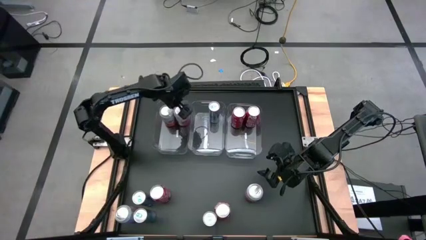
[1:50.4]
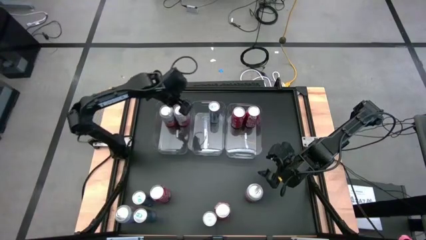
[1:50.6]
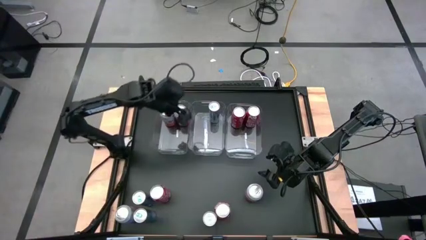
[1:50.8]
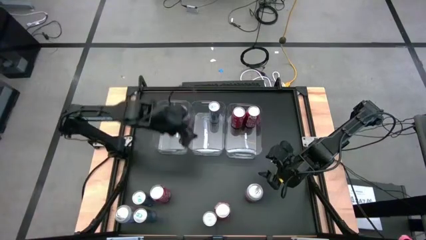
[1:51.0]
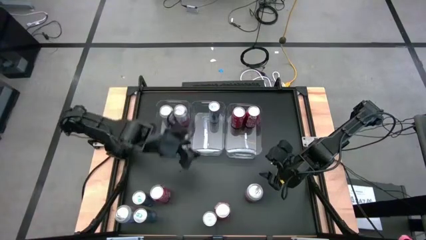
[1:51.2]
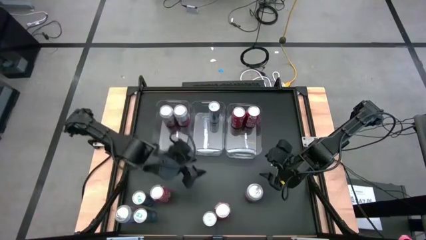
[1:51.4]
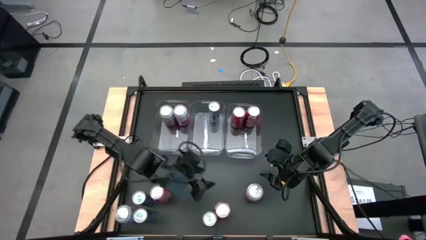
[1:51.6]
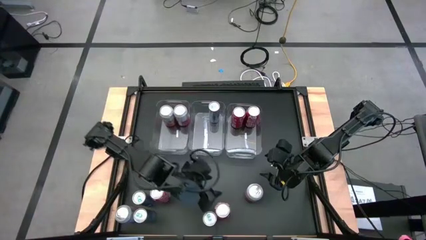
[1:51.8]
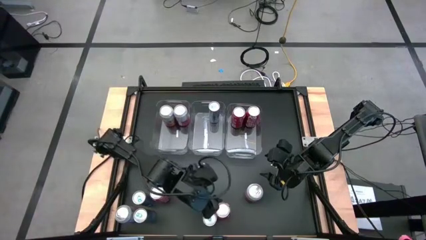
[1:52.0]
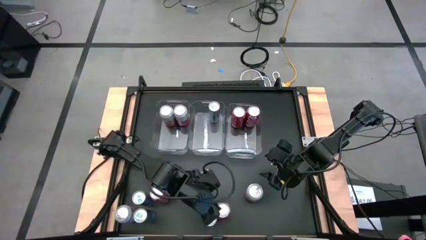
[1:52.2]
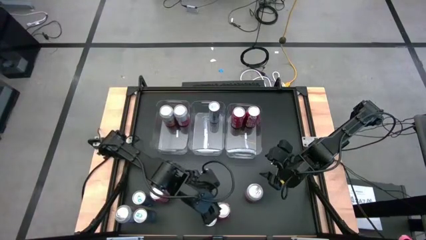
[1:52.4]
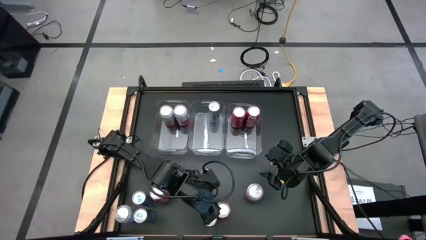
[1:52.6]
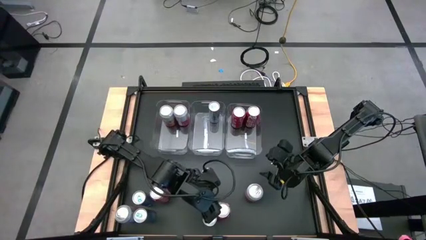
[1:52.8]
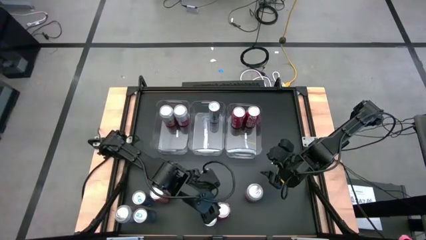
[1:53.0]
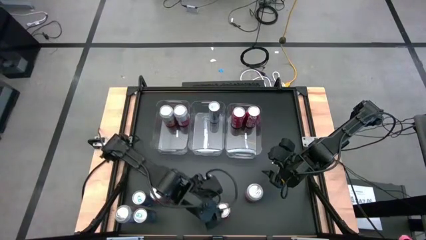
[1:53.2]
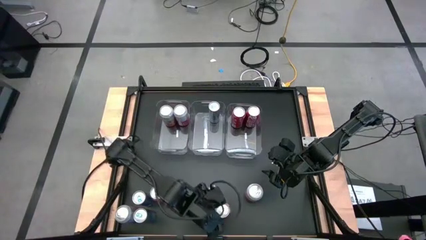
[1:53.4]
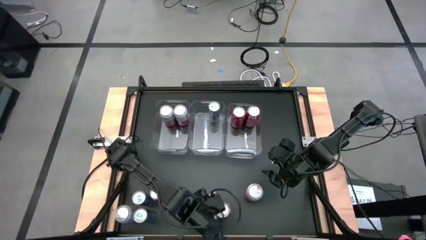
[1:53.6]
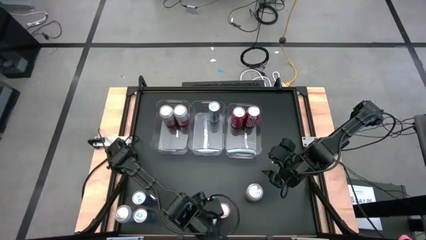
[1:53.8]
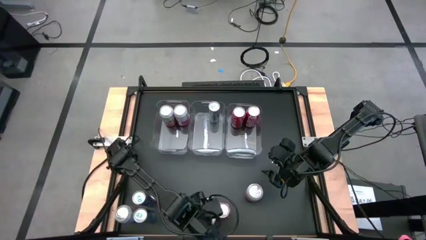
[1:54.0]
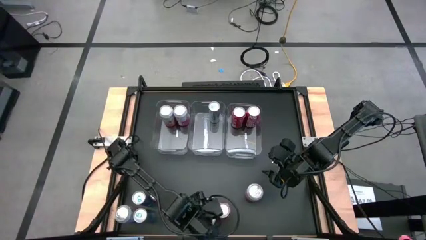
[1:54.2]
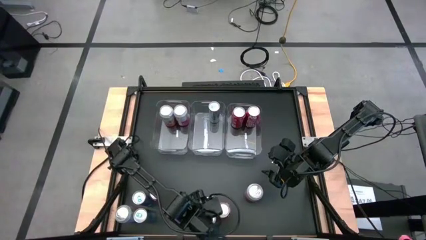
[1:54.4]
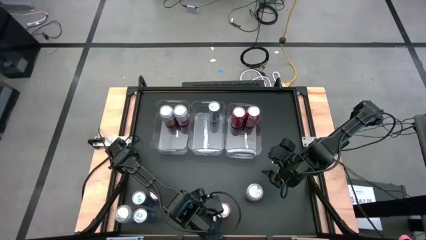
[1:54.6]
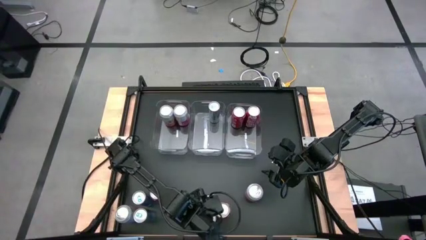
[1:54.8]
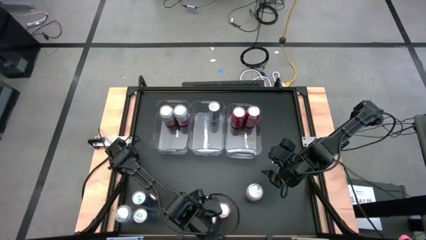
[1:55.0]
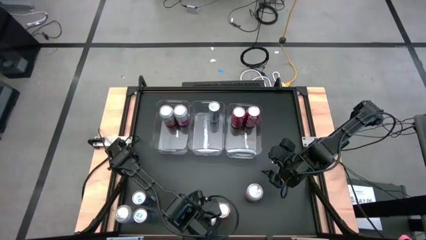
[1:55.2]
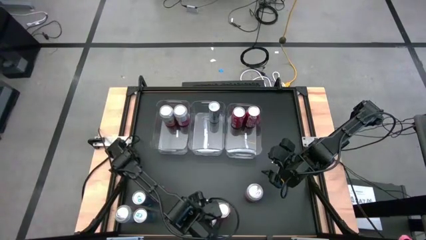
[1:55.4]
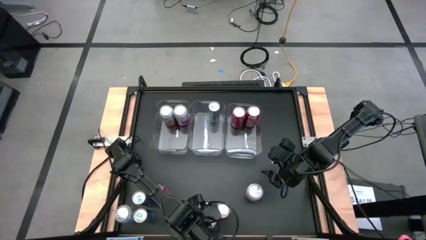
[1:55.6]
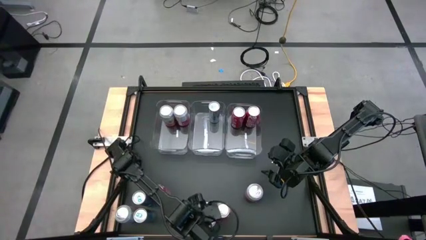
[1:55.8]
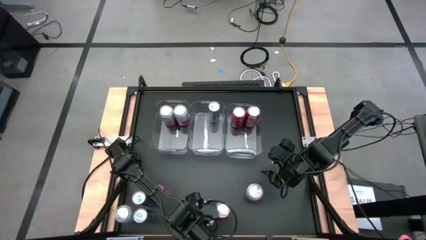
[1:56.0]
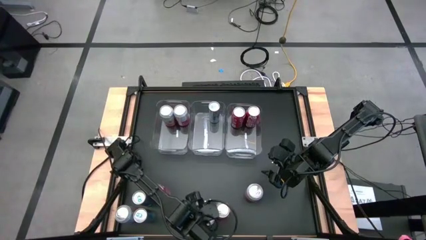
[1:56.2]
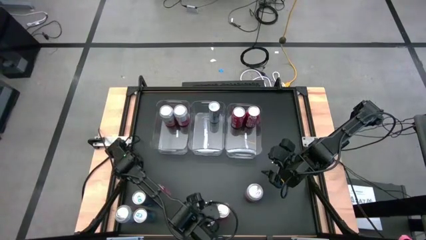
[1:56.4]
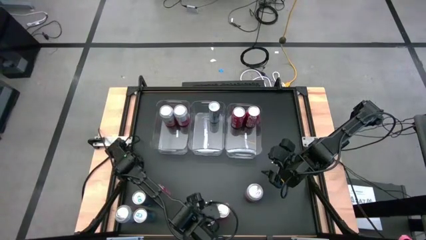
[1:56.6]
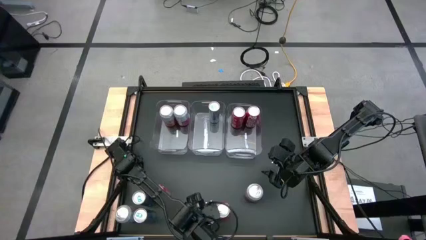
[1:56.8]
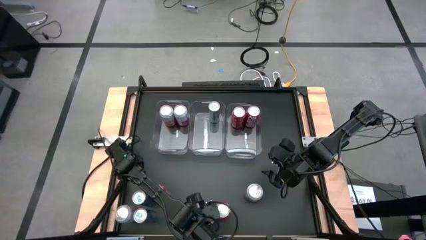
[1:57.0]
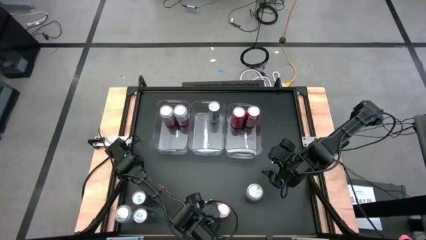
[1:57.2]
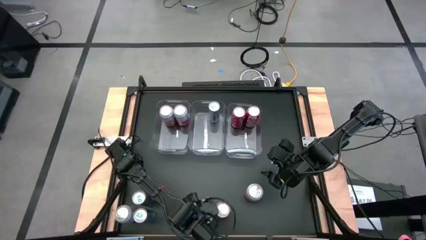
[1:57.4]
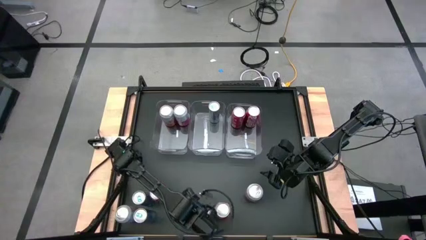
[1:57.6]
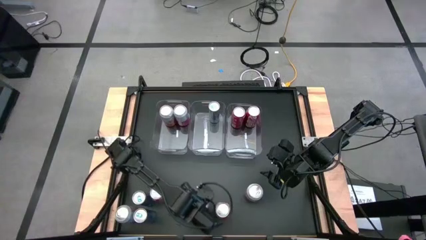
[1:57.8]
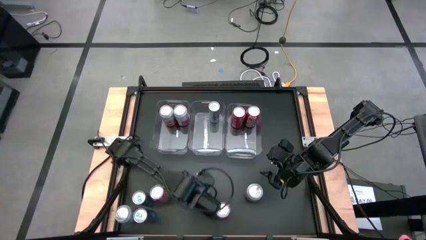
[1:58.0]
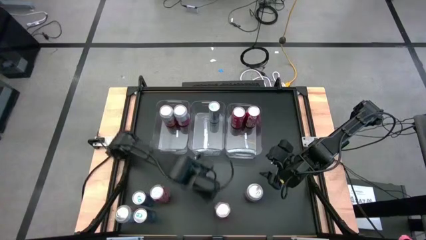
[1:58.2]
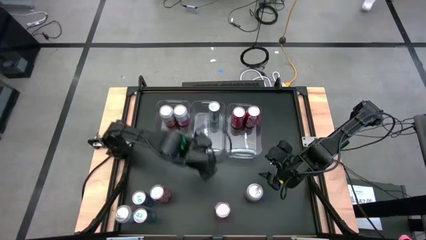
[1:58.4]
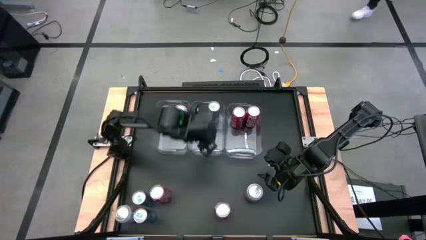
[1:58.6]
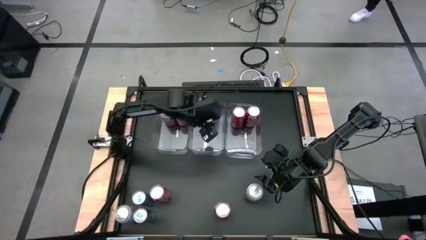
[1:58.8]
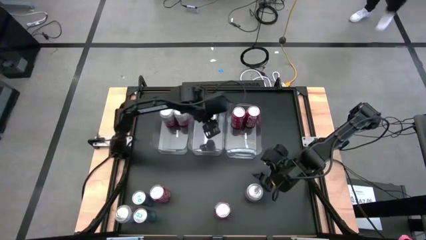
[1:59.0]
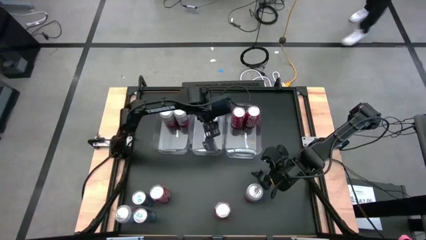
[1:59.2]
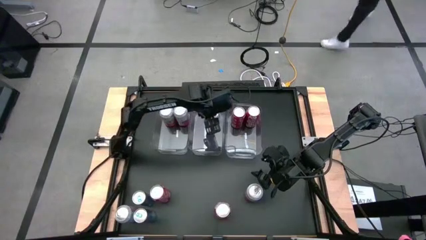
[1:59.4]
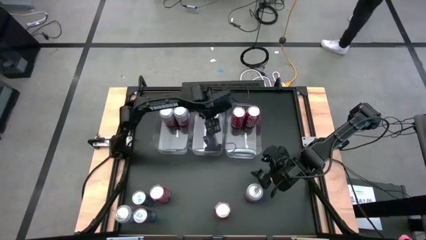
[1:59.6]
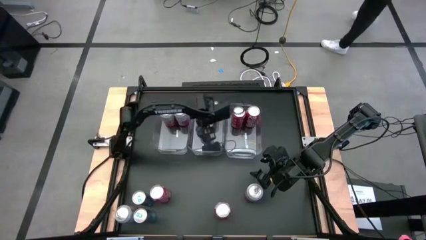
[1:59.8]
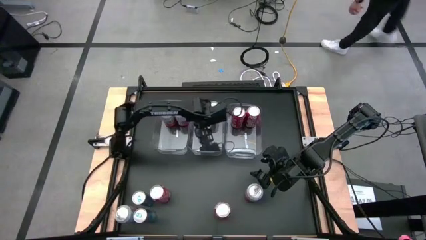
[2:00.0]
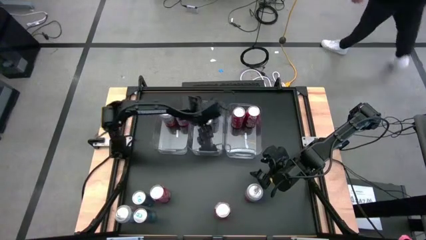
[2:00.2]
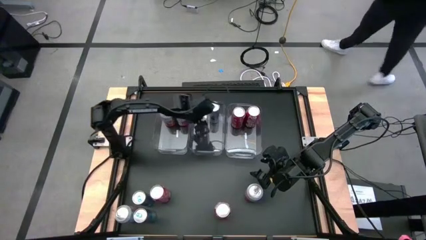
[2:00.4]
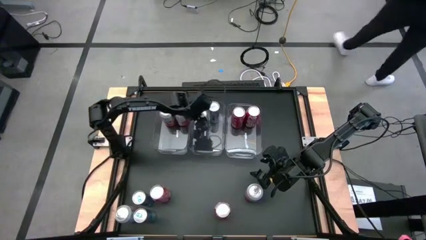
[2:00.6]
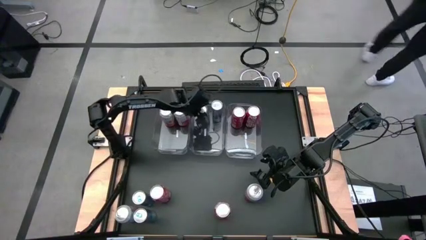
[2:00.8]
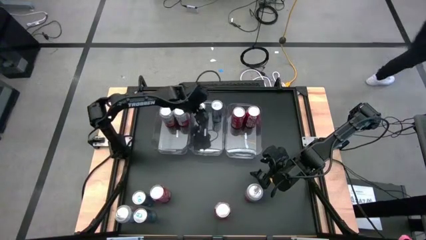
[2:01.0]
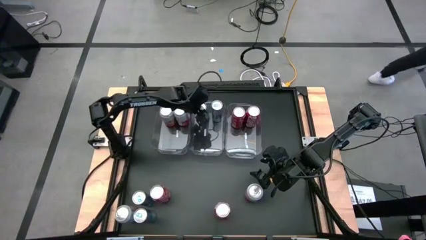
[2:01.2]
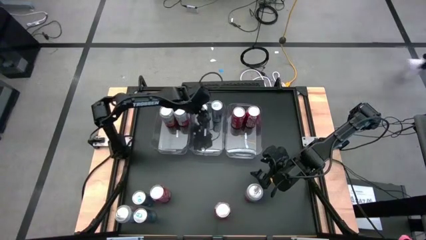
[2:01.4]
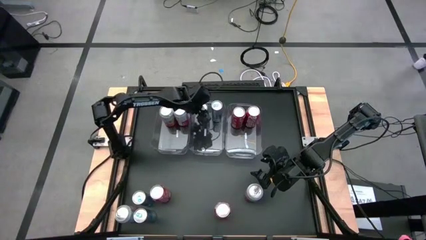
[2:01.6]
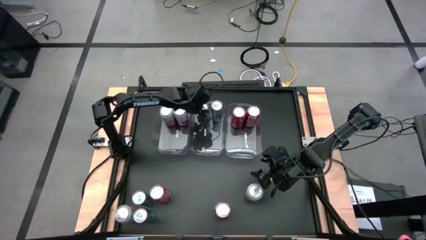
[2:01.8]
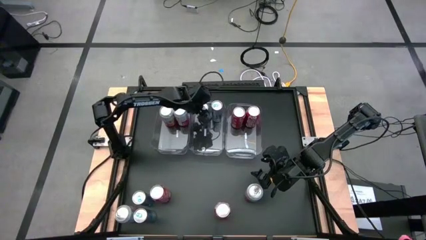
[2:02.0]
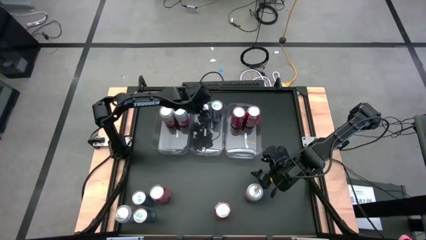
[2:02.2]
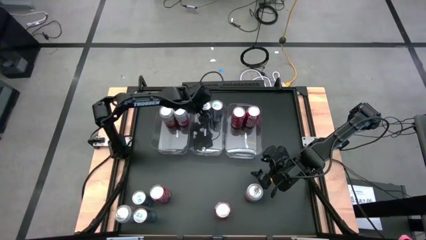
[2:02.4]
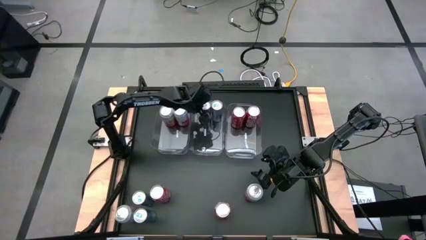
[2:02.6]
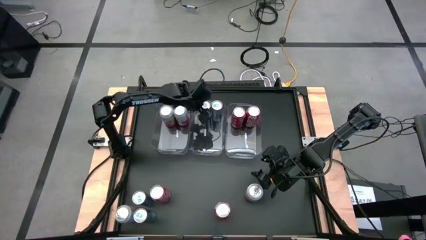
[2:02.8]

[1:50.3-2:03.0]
Task: Sort soda cans
Put the blue soda can into the center transparent bin
